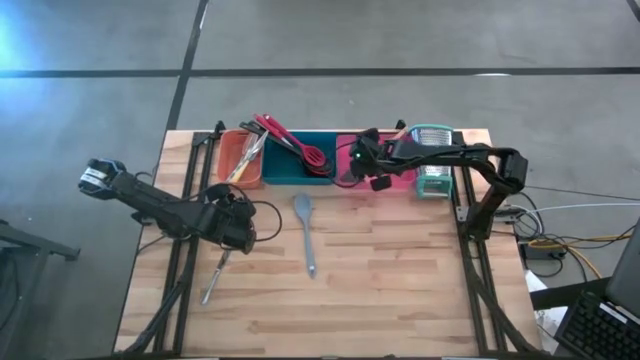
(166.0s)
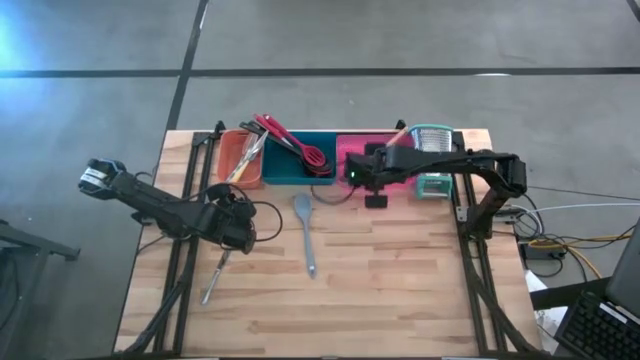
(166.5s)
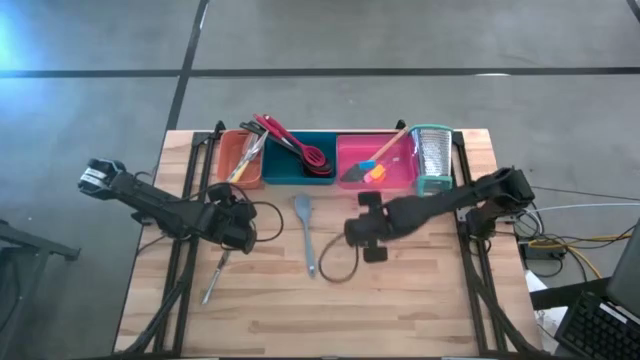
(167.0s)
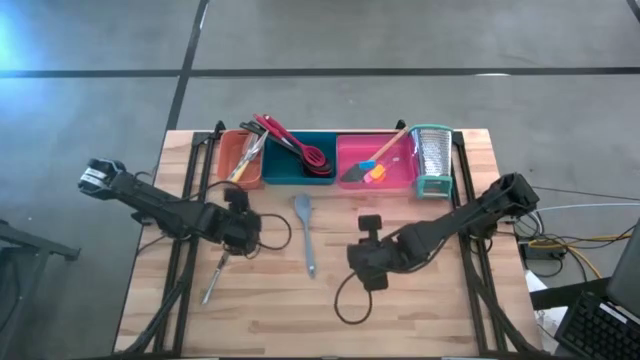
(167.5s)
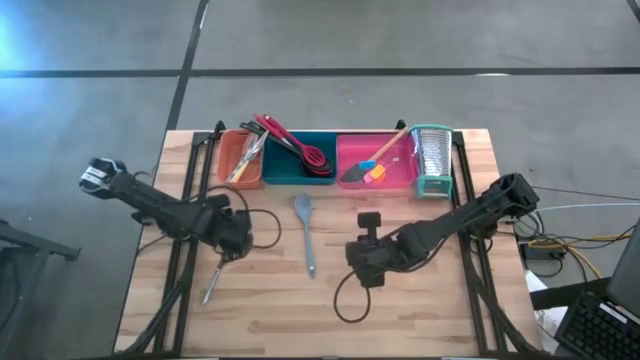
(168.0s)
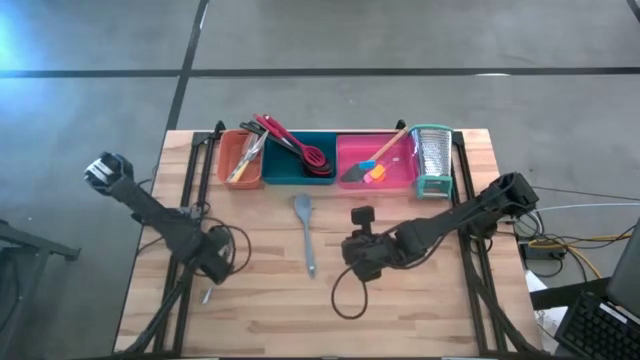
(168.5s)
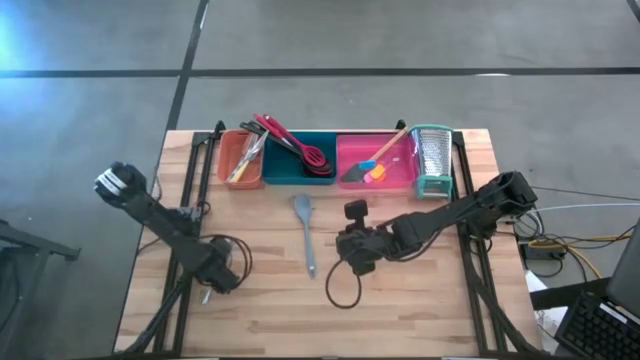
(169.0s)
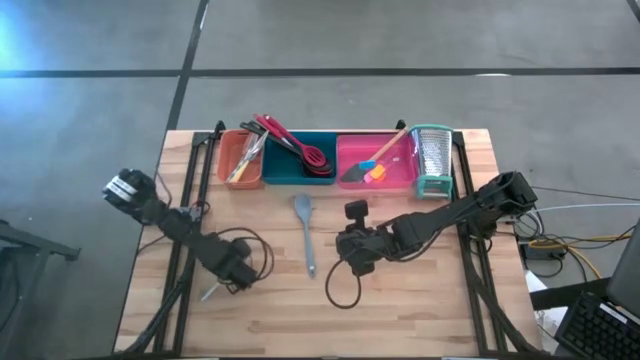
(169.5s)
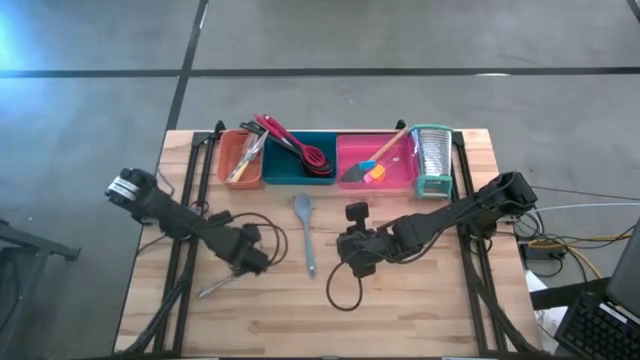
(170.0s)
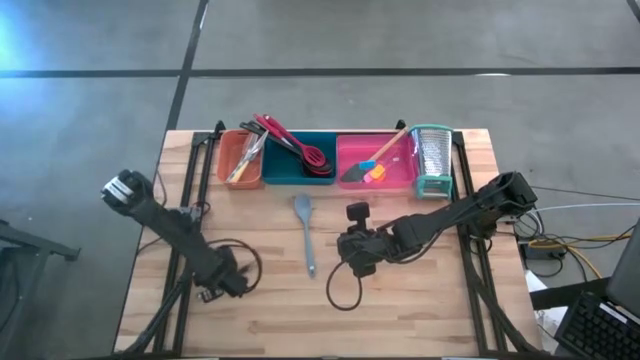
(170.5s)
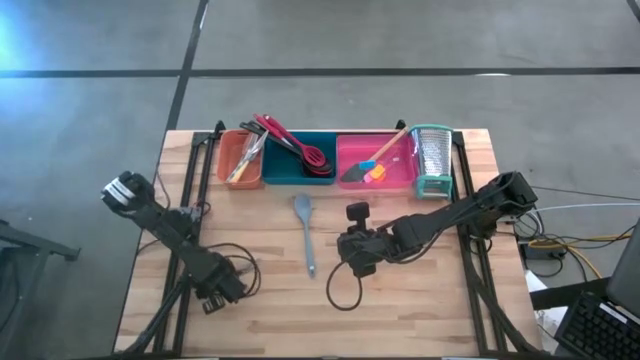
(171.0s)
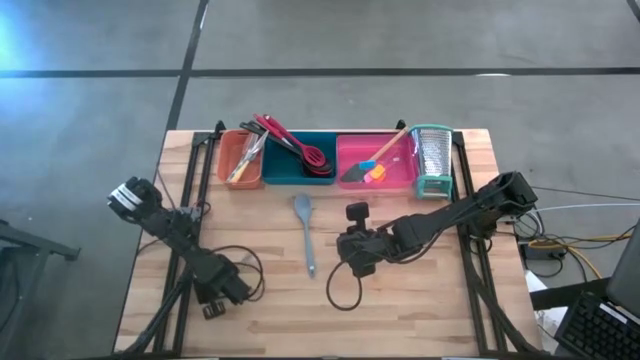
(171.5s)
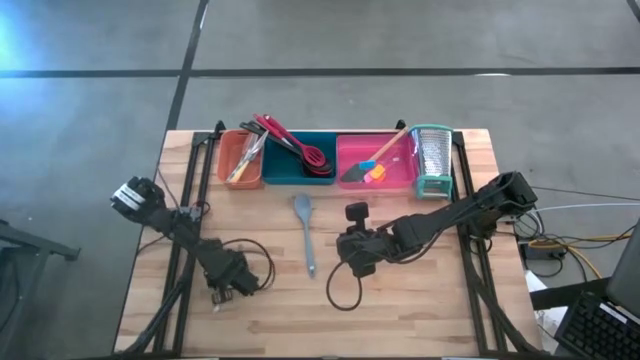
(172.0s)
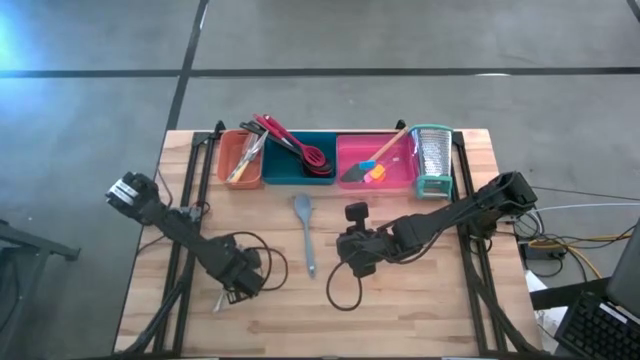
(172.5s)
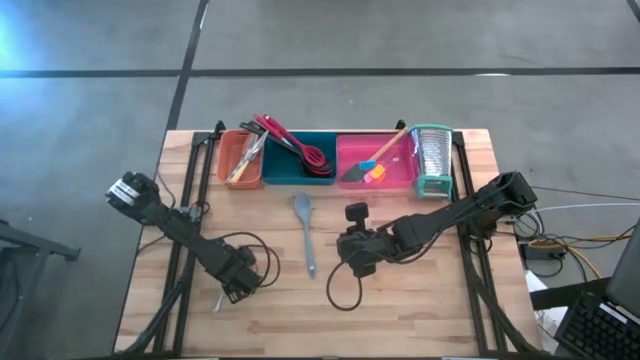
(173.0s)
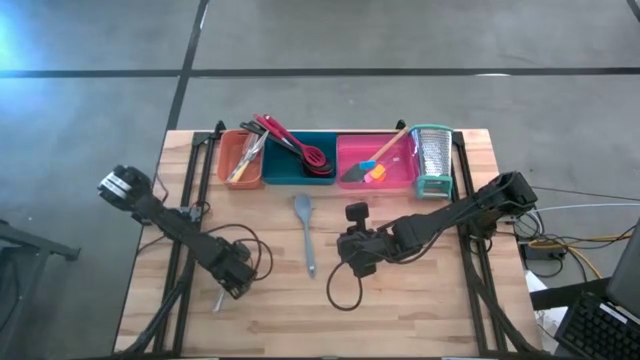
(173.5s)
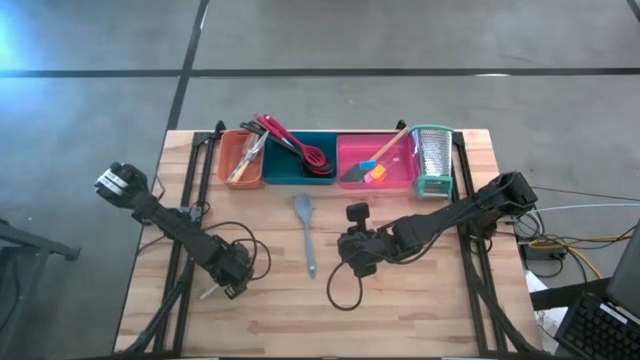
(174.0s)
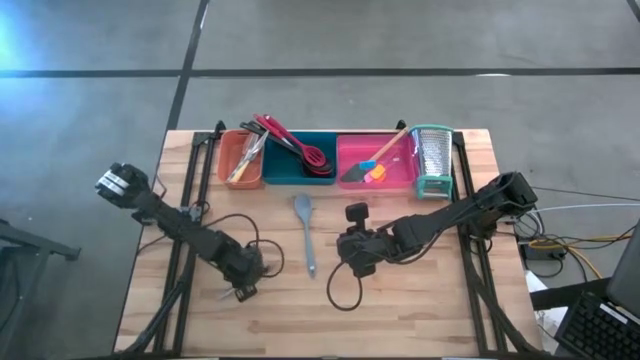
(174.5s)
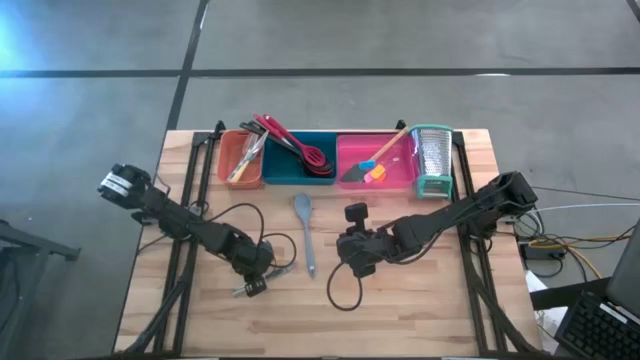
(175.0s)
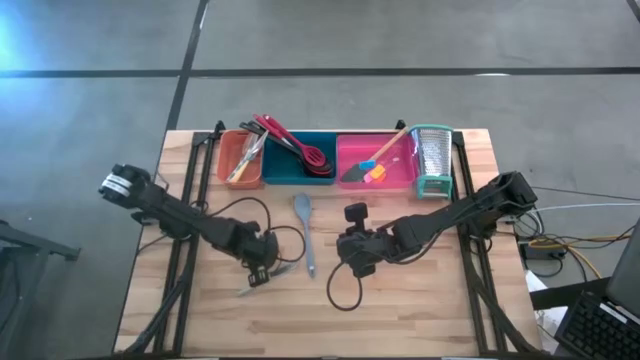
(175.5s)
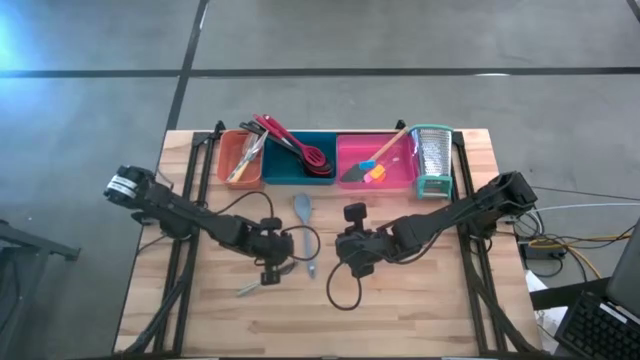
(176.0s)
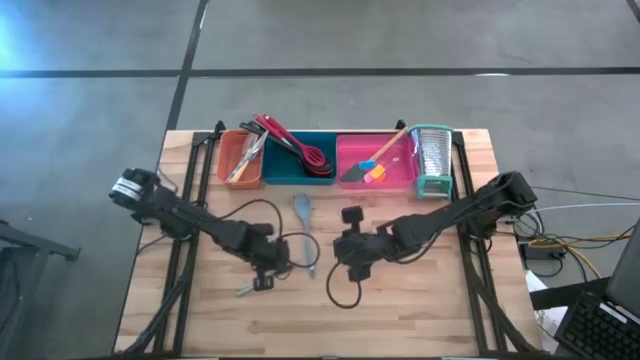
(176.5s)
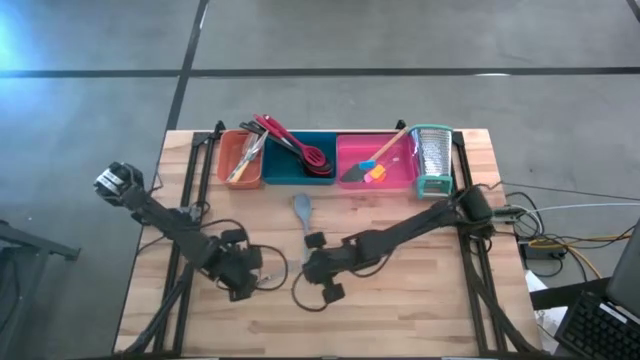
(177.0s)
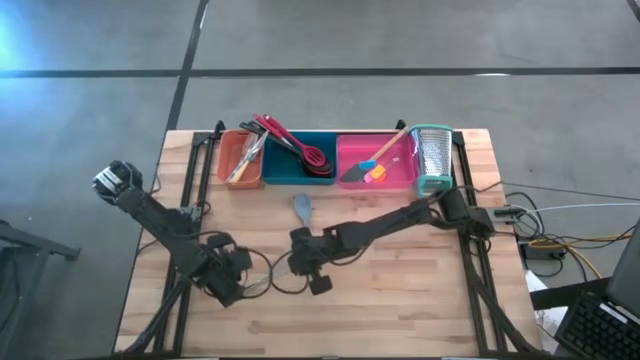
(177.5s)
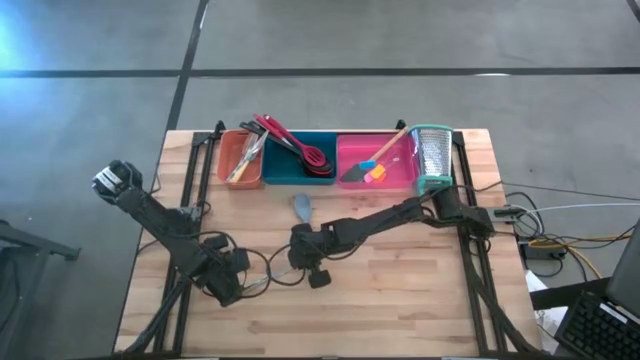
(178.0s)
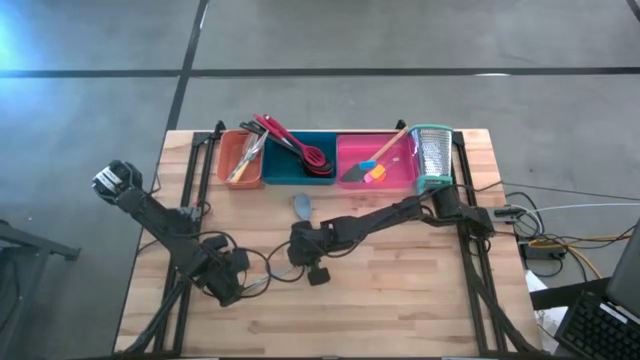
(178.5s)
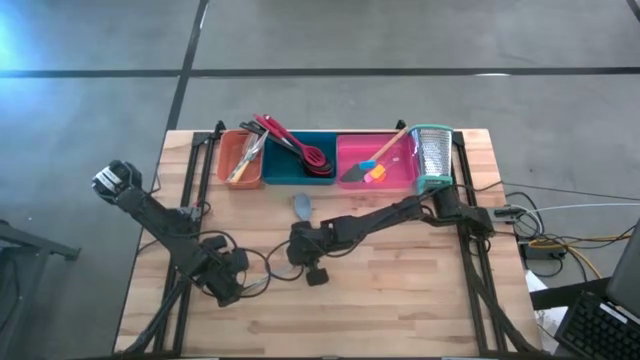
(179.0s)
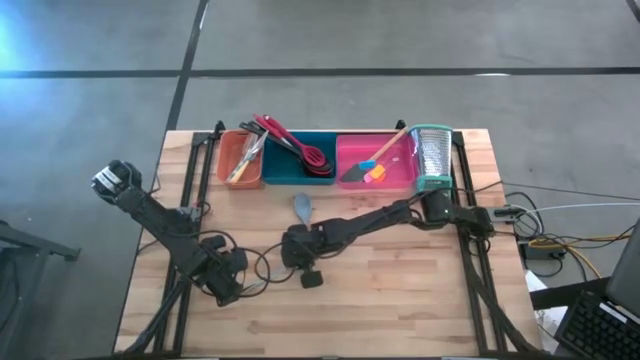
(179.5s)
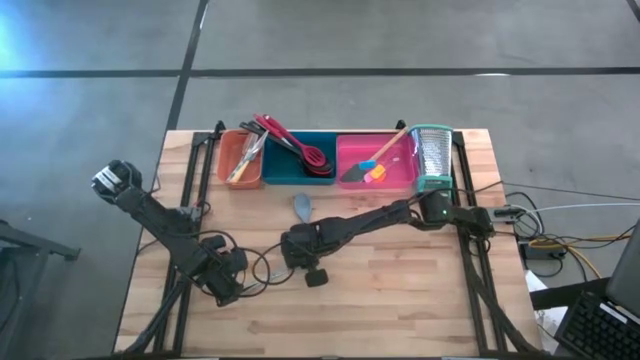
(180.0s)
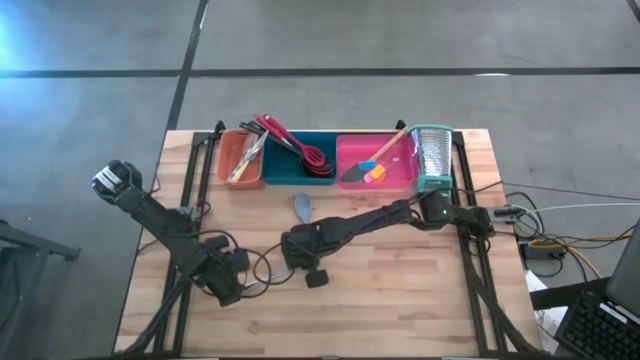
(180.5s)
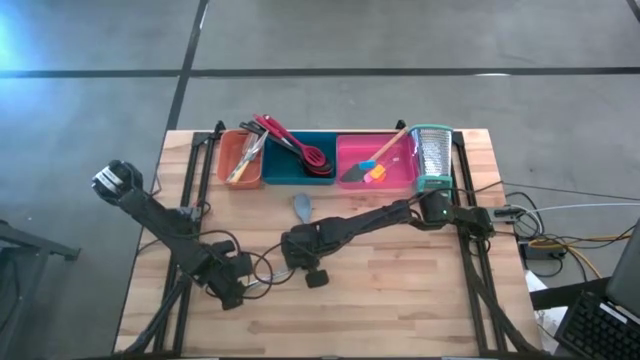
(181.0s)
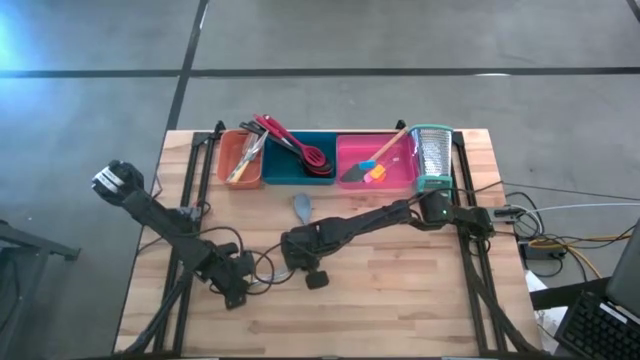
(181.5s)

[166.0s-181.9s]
Task: Pick & Place Kitchen Items
Put the silver knife into the orange bin

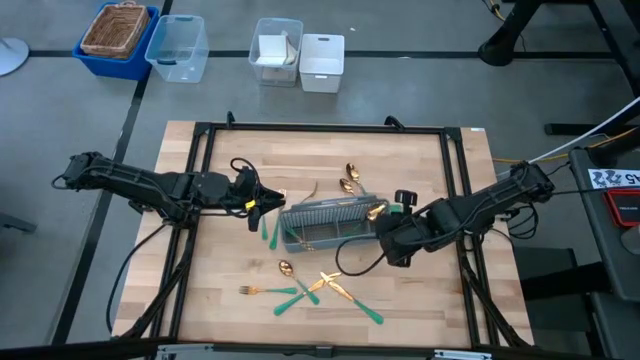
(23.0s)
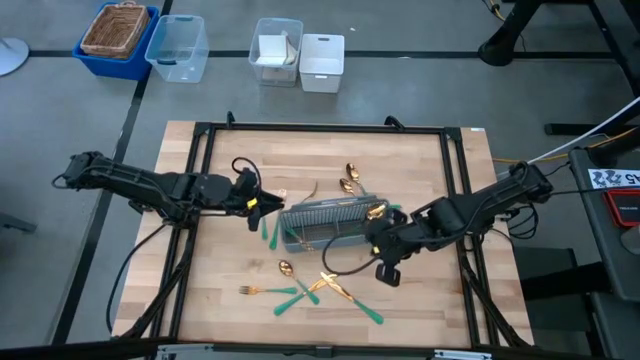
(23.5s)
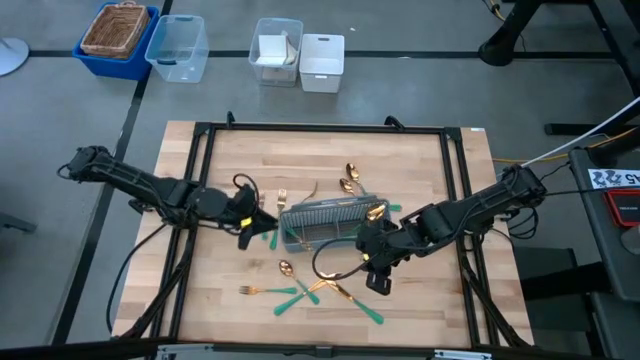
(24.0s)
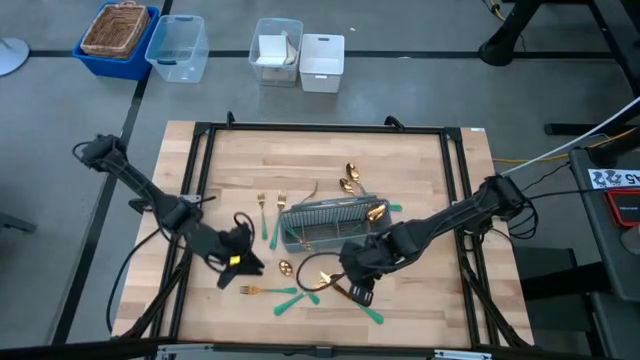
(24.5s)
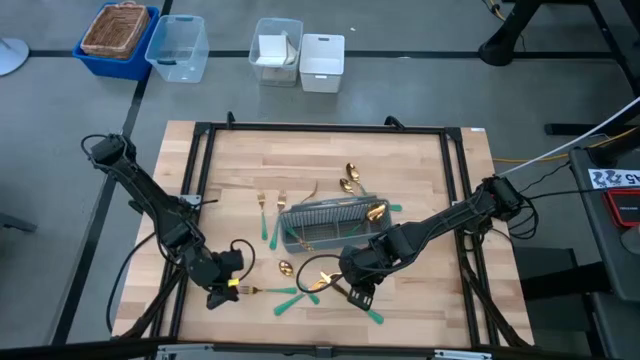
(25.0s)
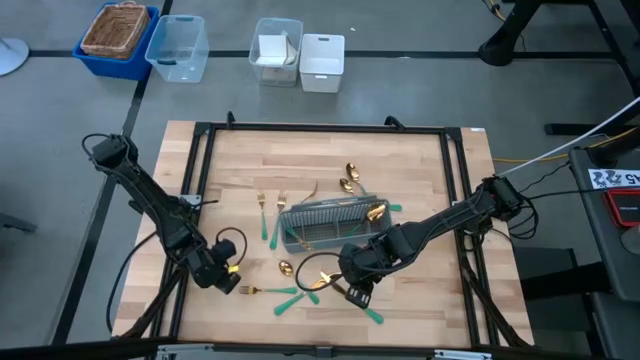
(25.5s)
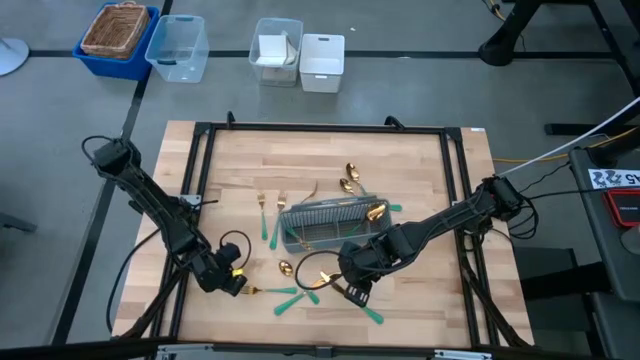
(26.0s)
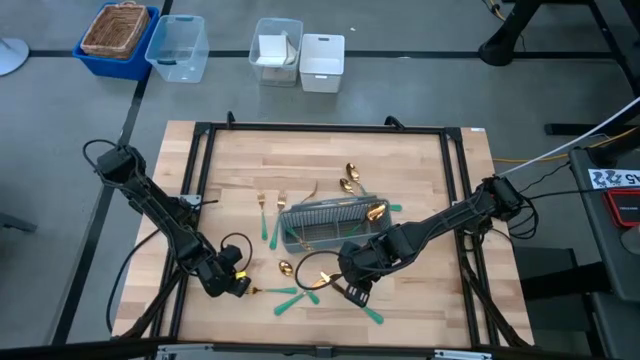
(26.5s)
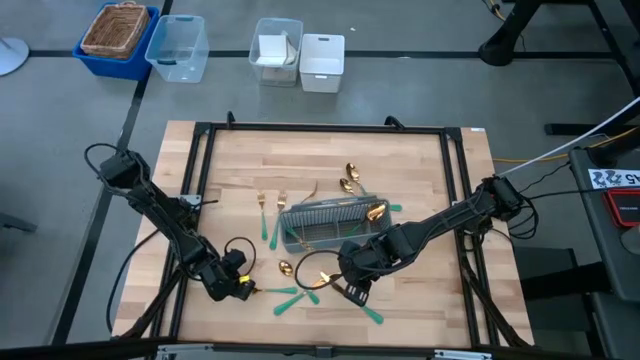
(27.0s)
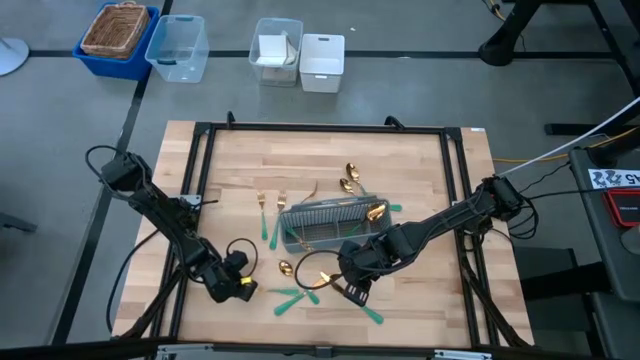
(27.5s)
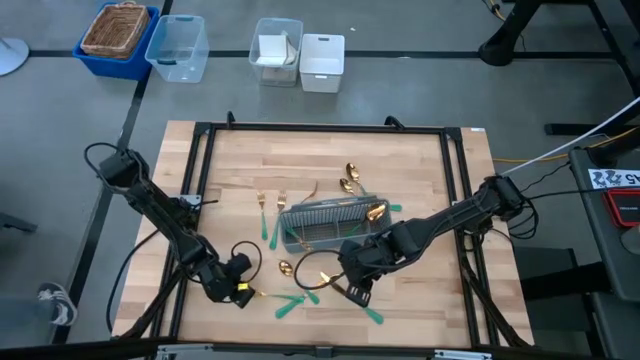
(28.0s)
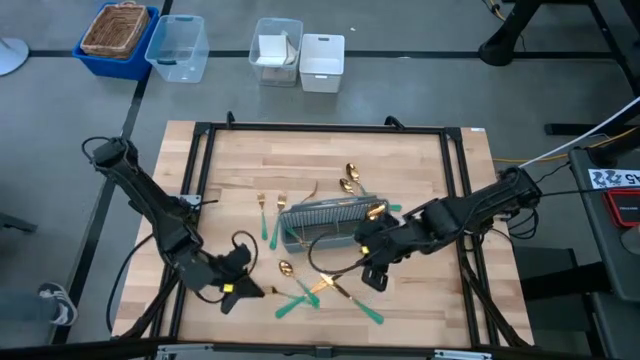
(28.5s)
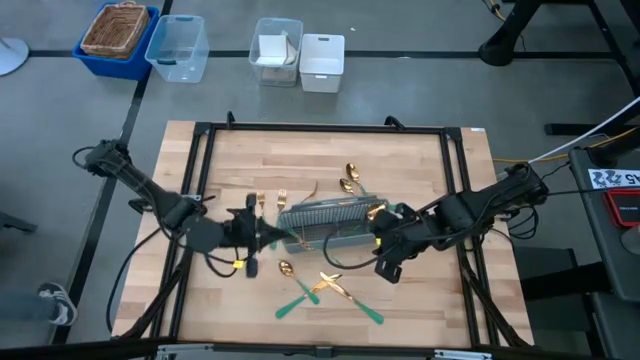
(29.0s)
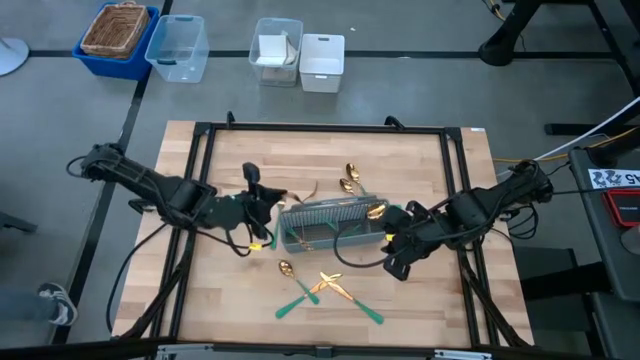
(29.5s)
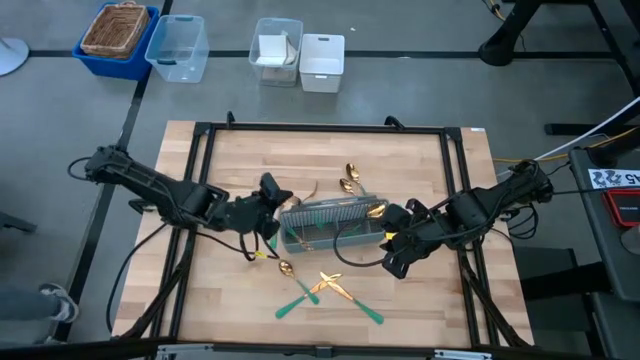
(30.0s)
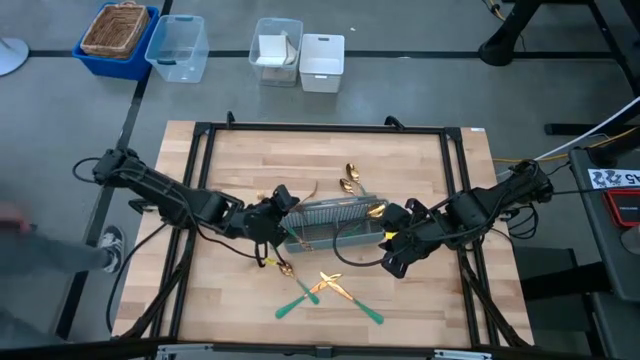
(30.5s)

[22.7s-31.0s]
Task: Sort silverware
Put the green fork into the gray utensil holder
